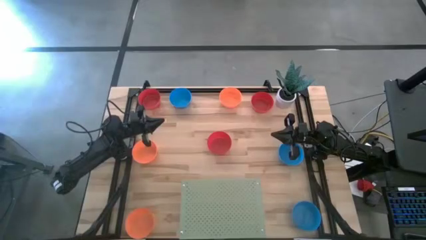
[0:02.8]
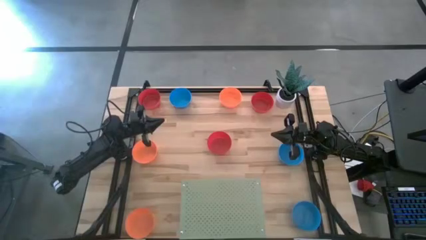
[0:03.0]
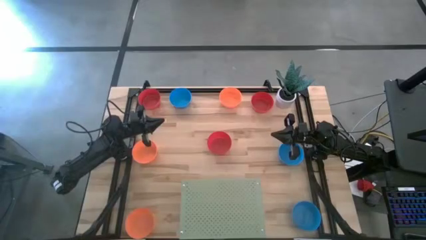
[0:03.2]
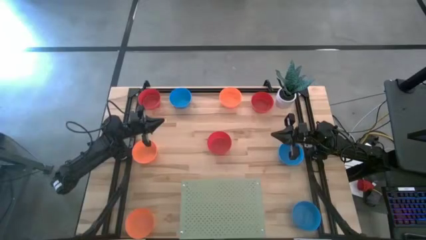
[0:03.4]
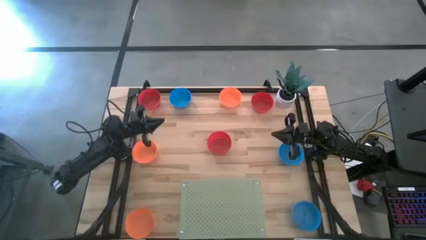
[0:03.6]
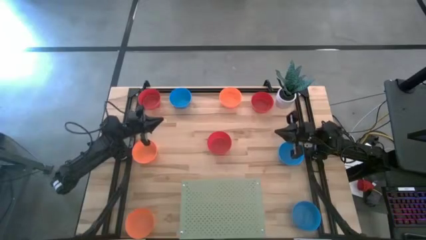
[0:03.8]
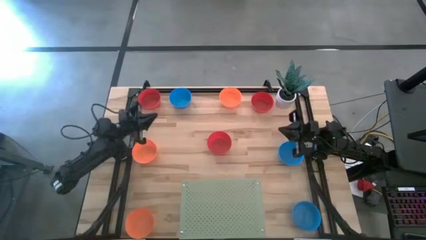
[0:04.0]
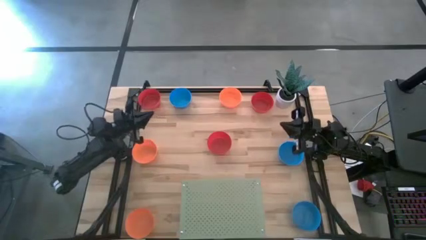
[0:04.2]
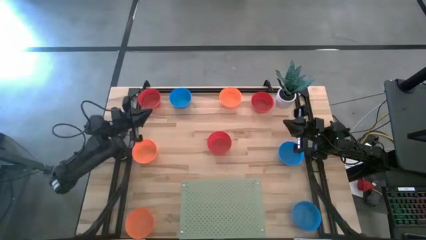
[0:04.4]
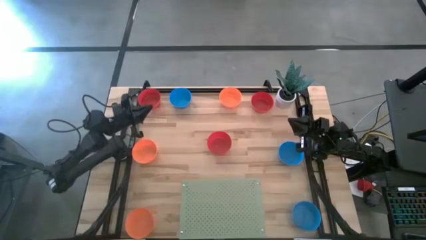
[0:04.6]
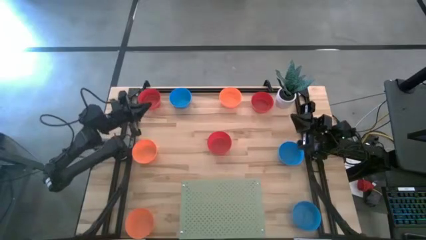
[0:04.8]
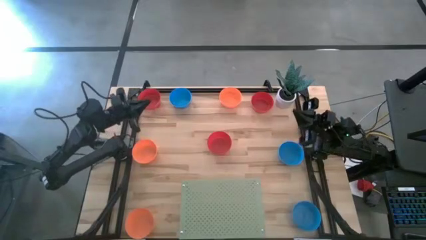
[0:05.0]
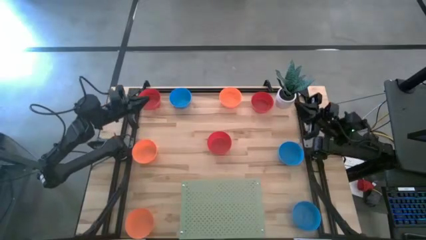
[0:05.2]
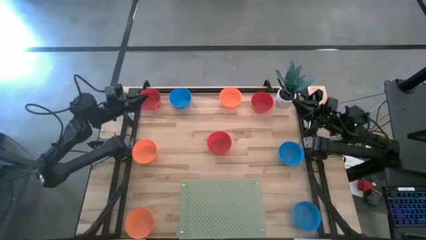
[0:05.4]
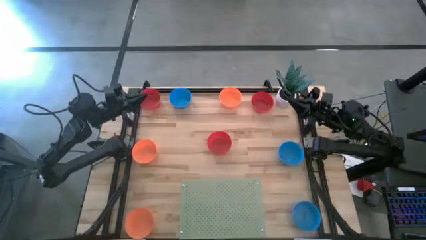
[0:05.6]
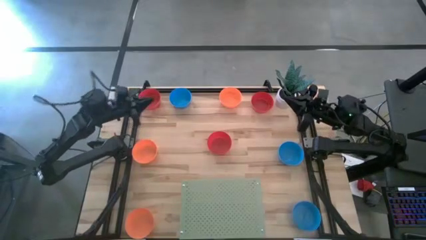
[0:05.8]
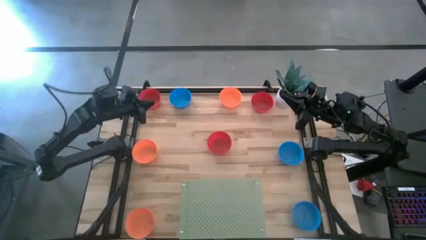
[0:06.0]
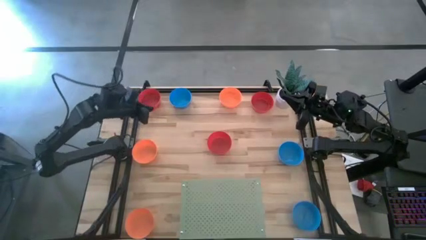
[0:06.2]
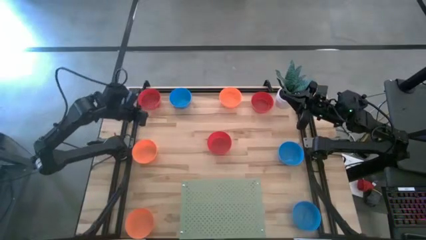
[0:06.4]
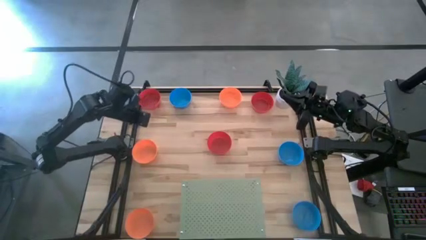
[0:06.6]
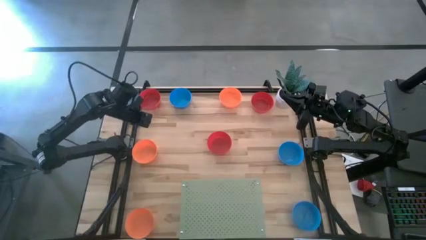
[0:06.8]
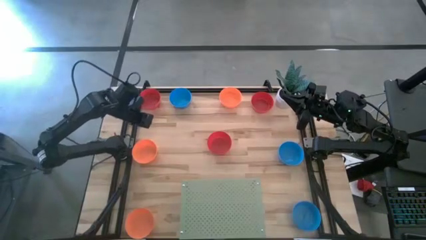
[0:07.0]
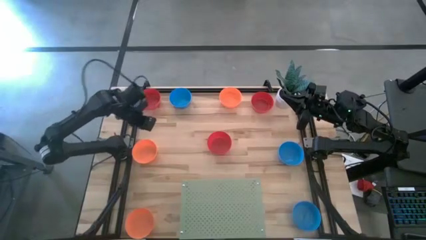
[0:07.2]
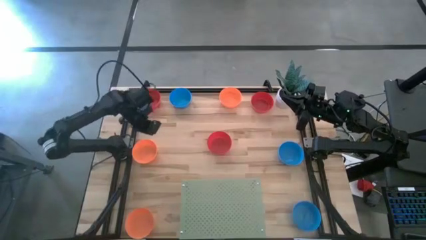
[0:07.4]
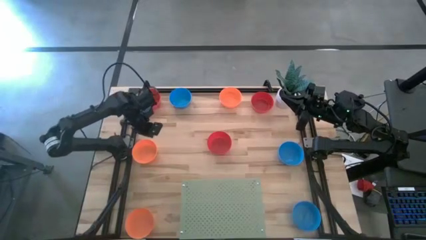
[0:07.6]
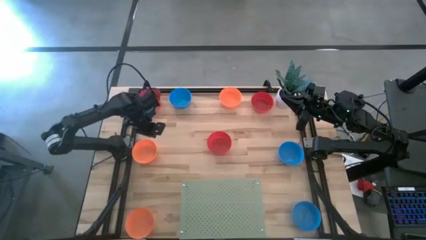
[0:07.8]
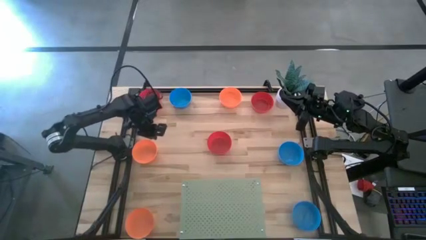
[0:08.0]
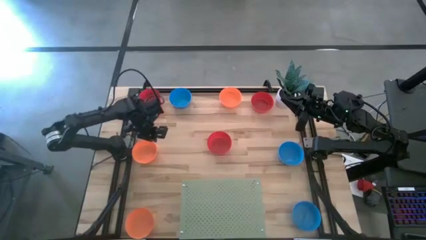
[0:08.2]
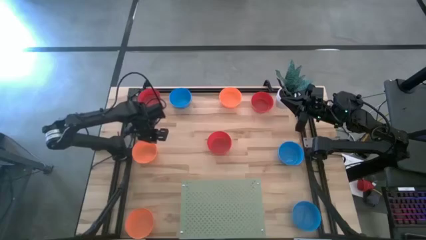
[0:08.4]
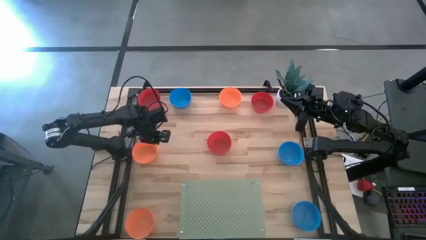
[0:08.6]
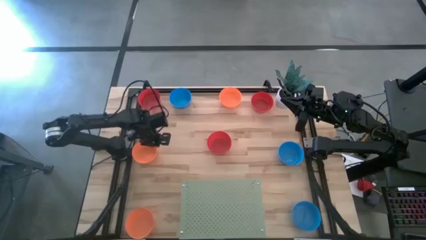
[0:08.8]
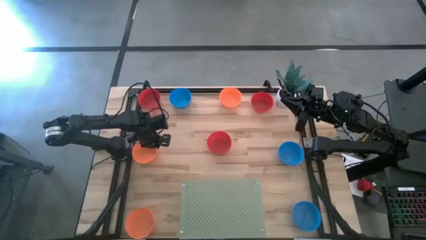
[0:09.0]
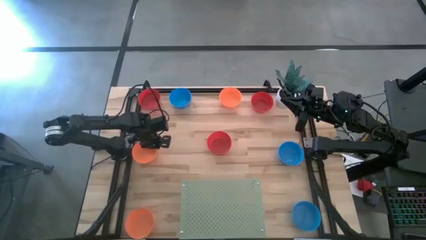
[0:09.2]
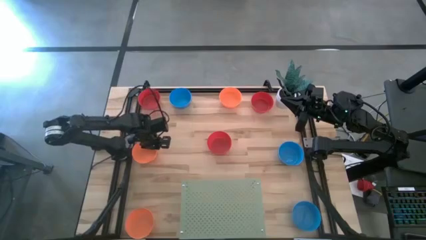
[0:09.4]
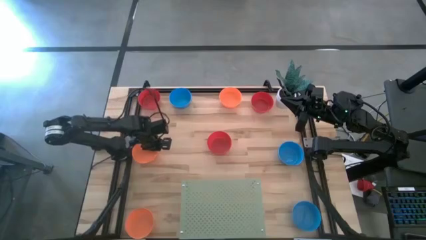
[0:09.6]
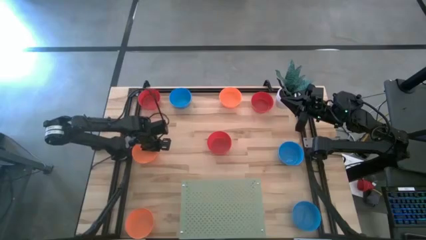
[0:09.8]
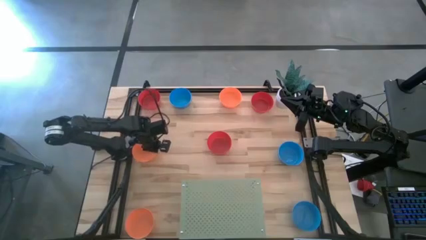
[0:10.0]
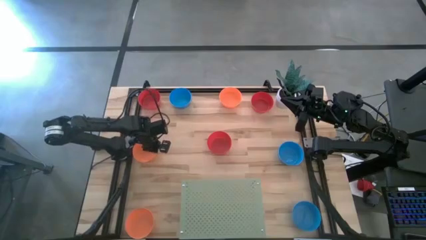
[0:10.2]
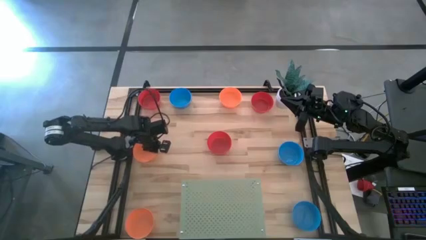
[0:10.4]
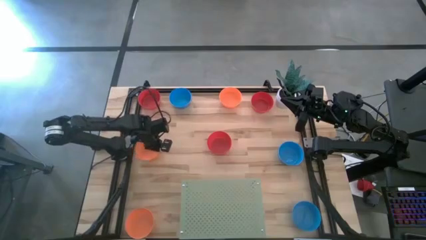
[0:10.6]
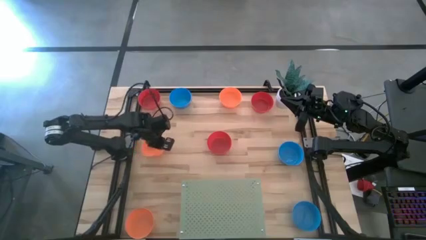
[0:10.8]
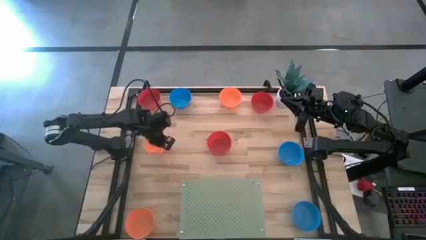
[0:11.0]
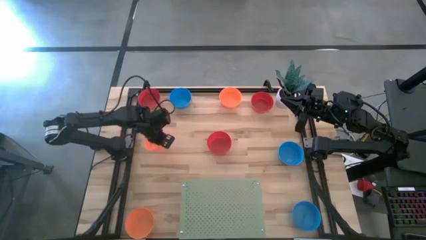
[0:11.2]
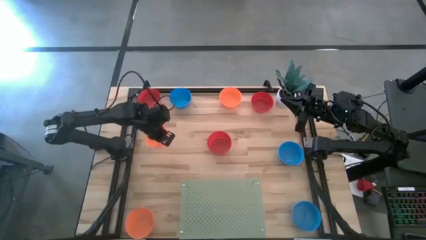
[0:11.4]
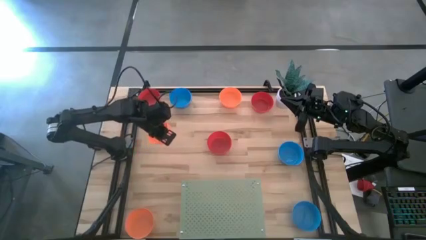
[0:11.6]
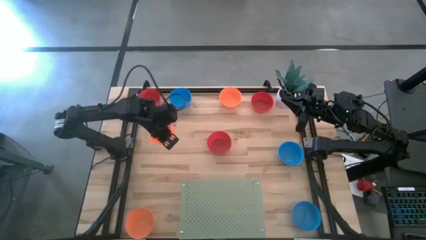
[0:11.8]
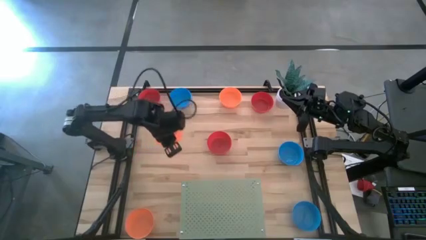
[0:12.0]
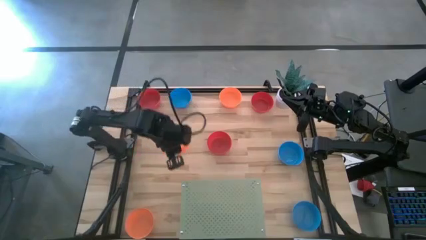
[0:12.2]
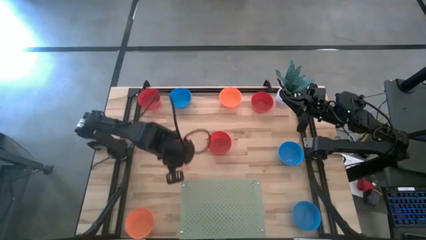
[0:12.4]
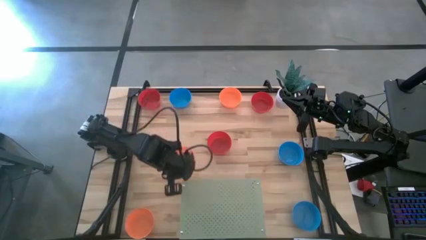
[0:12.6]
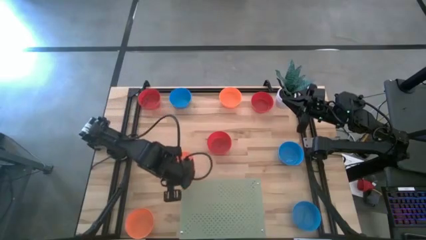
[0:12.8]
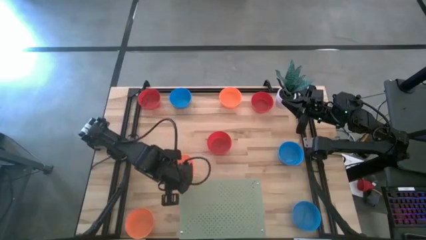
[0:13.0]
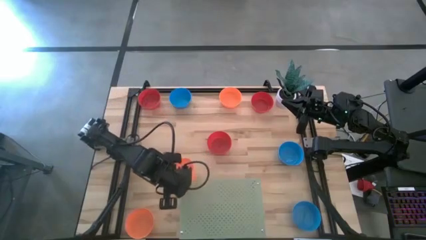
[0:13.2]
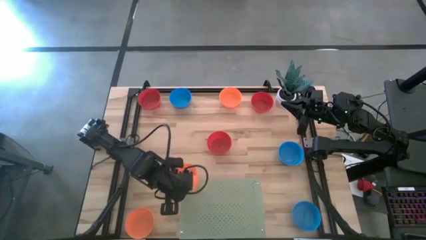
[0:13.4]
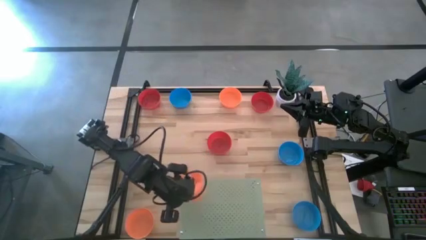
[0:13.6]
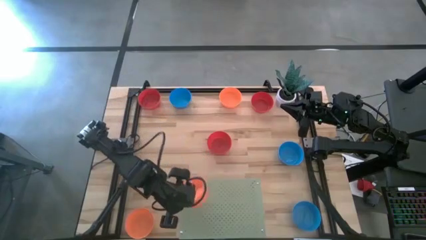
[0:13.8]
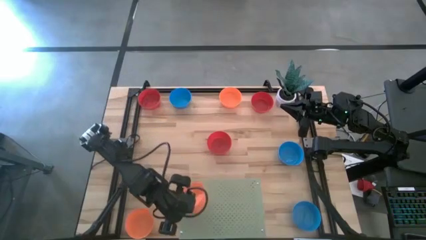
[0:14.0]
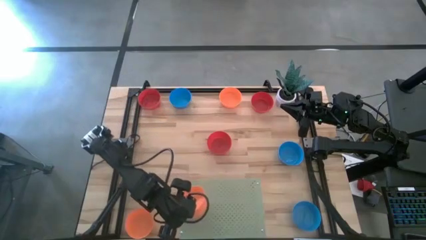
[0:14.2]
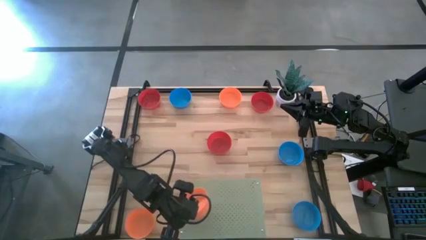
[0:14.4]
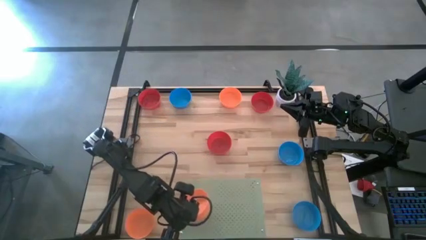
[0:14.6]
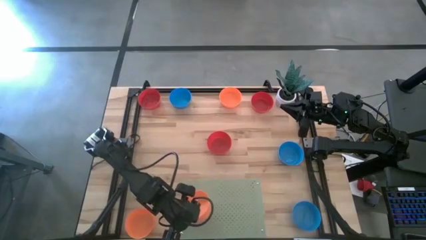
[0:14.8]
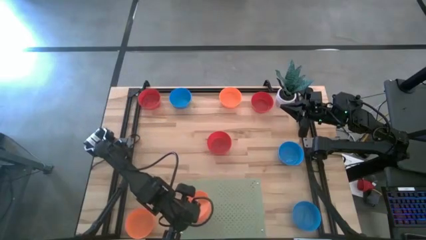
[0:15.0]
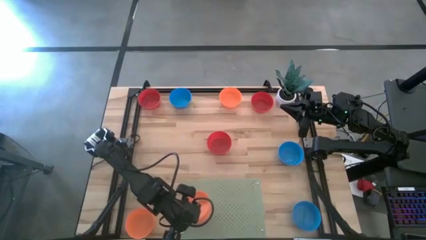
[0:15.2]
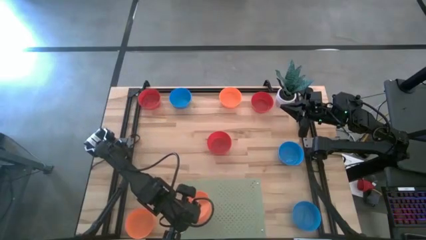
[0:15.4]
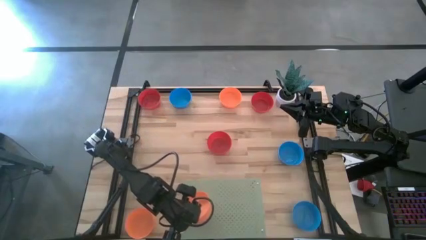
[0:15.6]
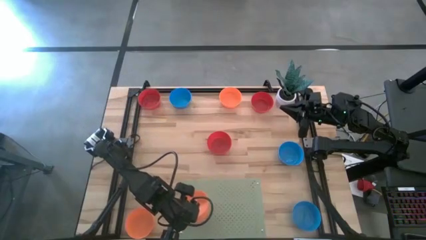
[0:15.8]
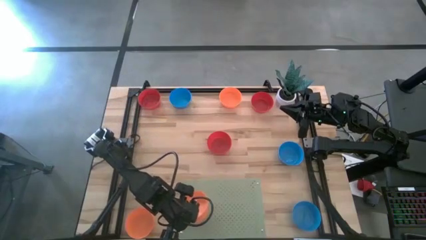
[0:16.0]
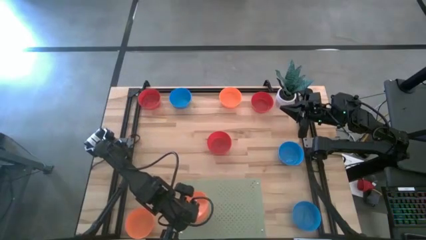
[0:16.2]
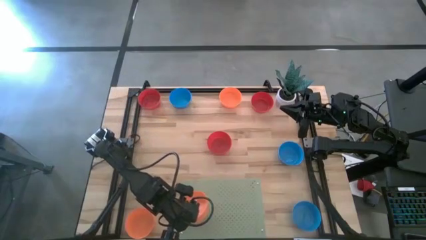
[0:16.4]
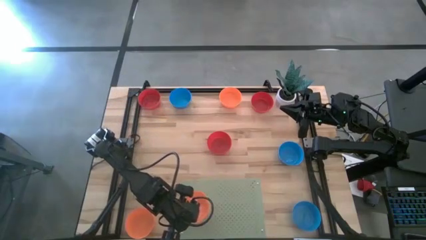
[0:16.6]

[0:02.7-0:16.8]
Task: Pick & Place Mini bowls
Put the middle orange bowl on the shelf
